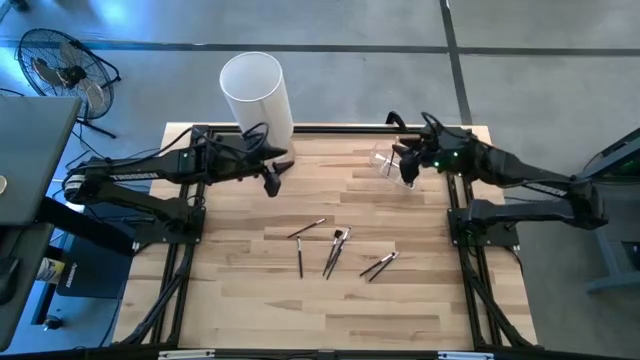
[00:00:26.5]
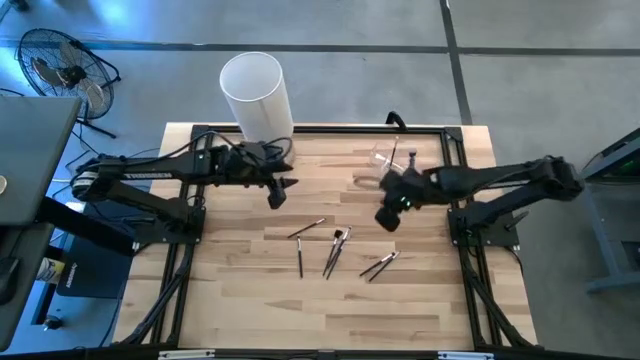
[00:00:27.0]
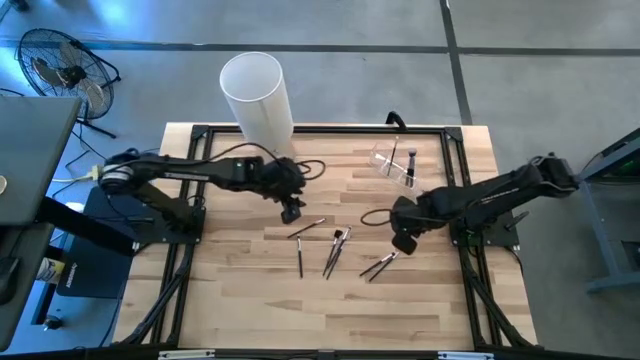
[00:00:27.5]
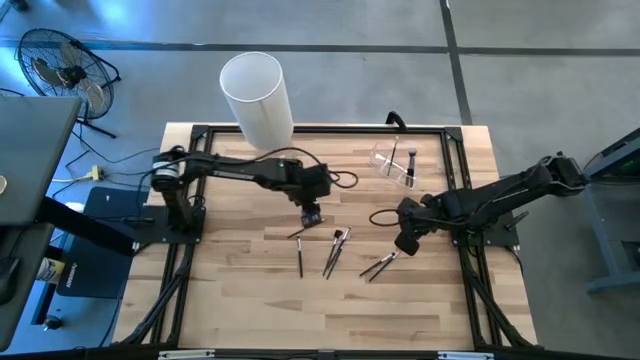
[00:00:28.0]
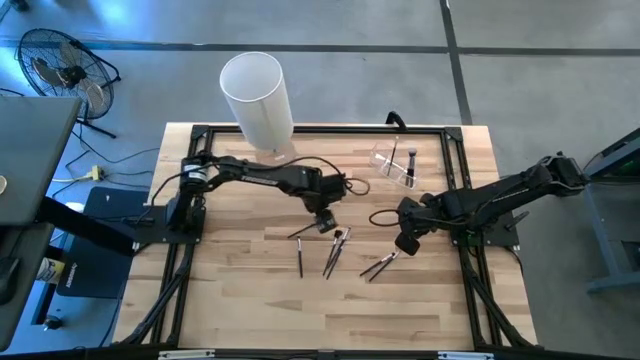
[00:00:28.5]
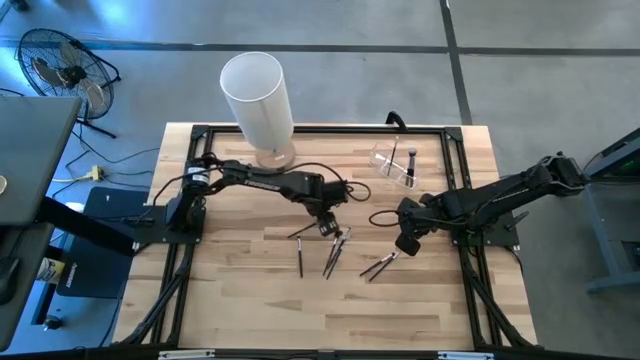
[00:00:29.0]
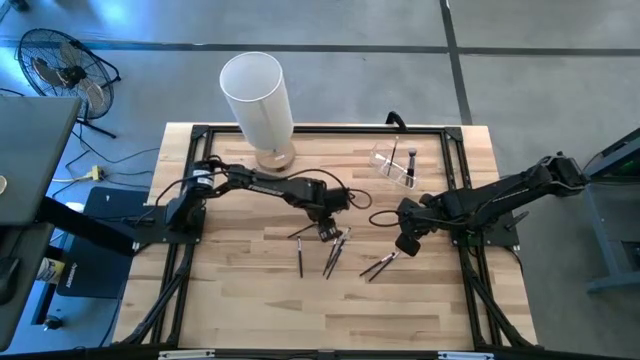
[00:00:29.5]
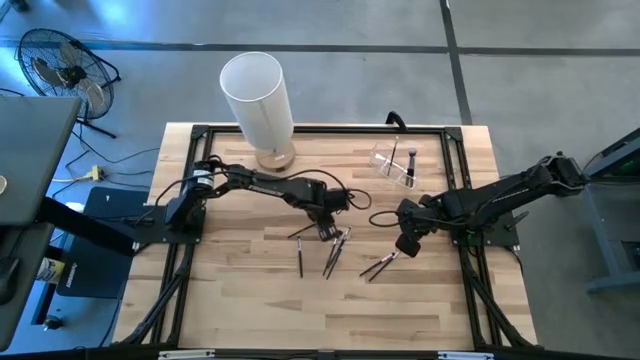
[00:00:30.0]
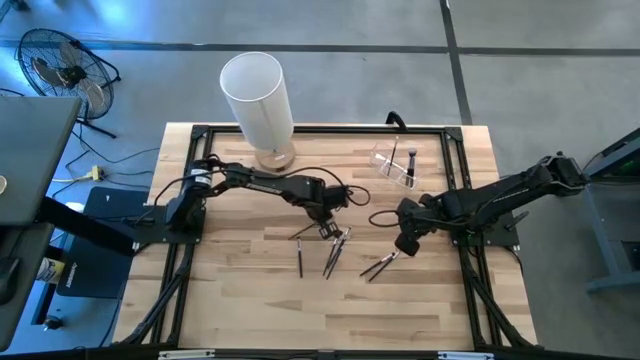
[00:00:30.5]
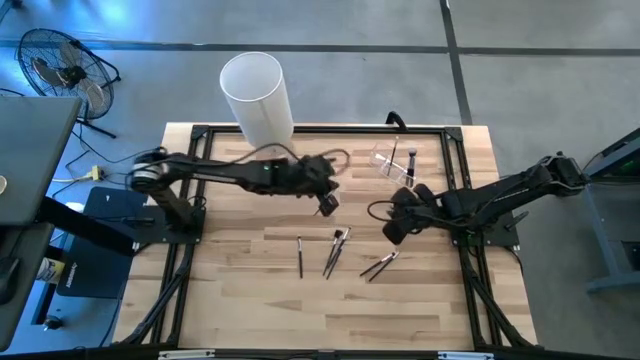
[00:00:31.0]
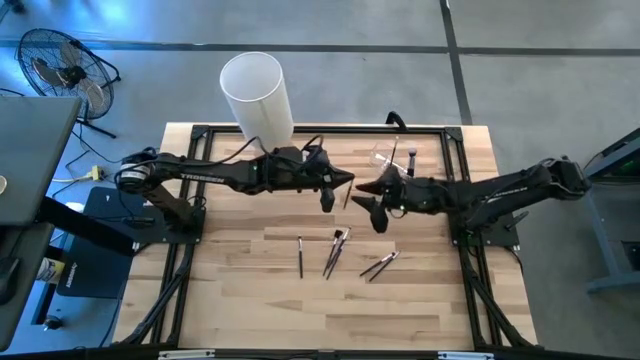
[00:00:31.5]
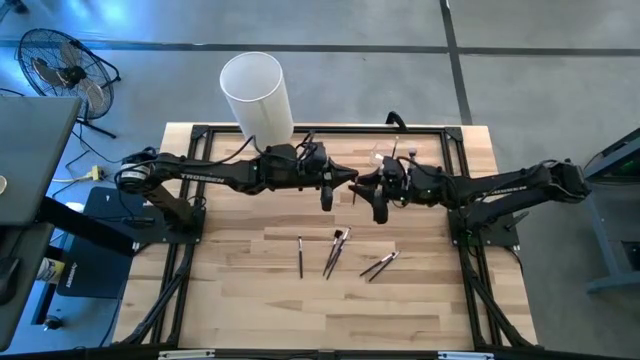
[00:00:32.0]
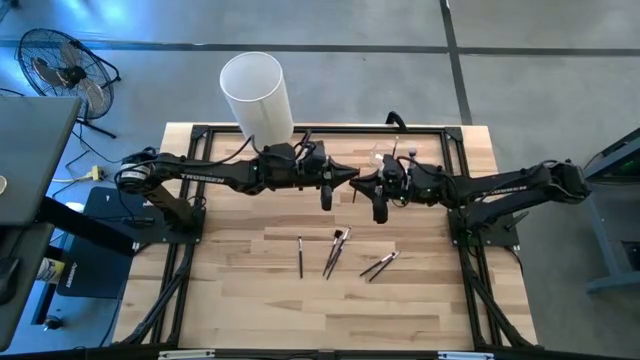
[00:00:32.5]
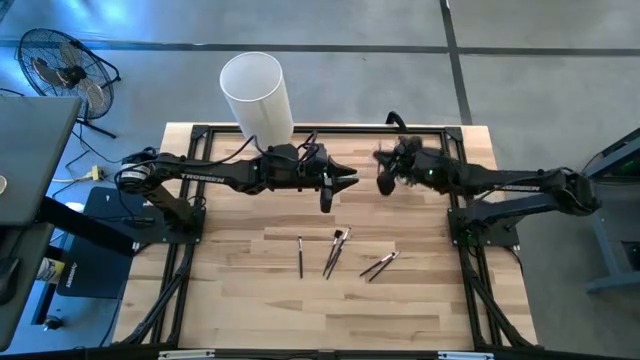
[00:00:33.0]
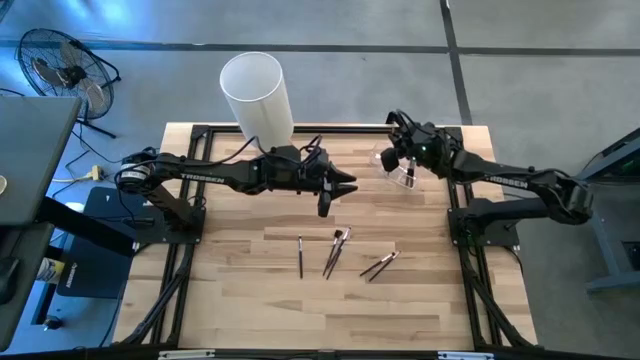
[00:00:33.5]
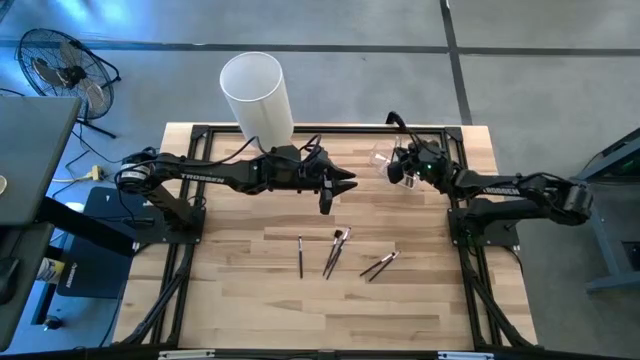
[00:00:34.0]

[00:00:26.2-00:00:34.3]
Task: Put items in baskets/containers
Put the eyeshadow brush into the transparent organizer

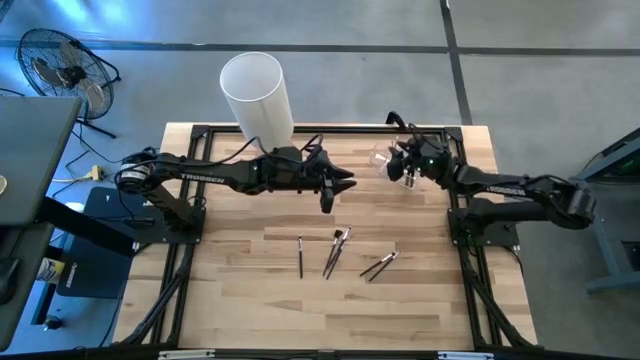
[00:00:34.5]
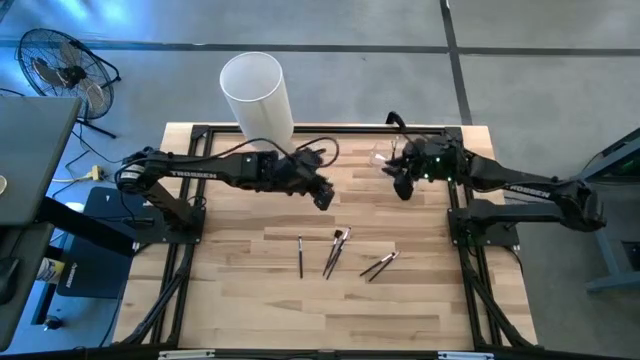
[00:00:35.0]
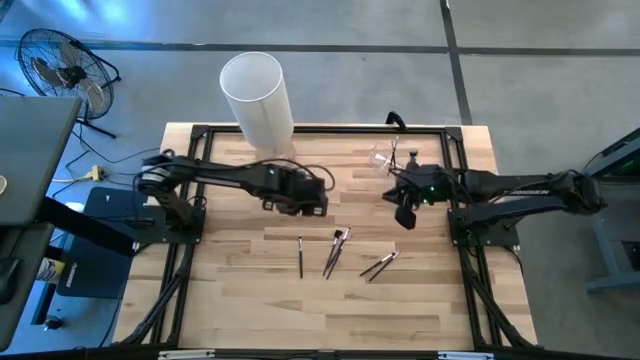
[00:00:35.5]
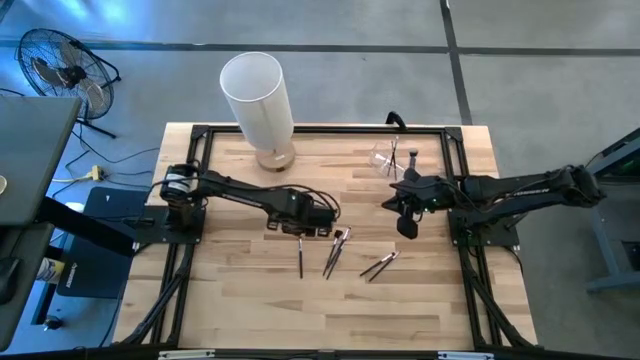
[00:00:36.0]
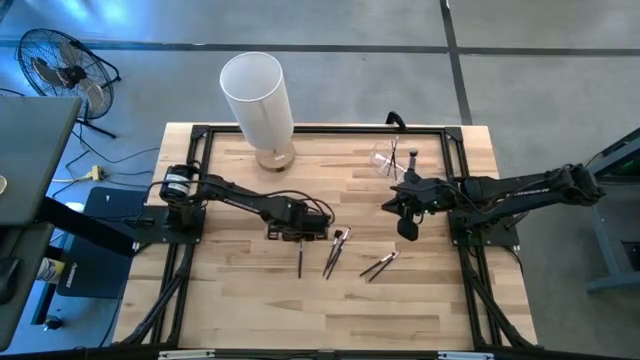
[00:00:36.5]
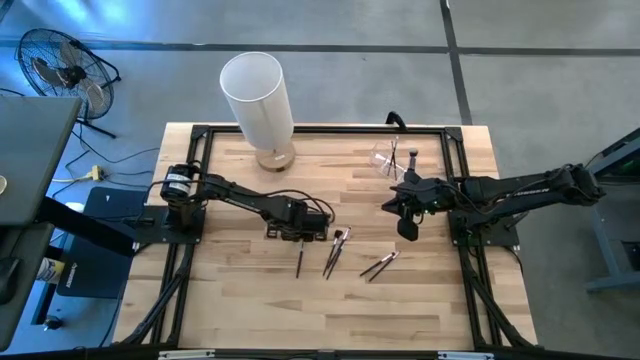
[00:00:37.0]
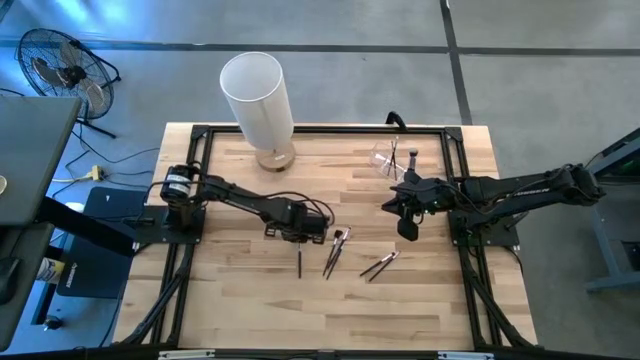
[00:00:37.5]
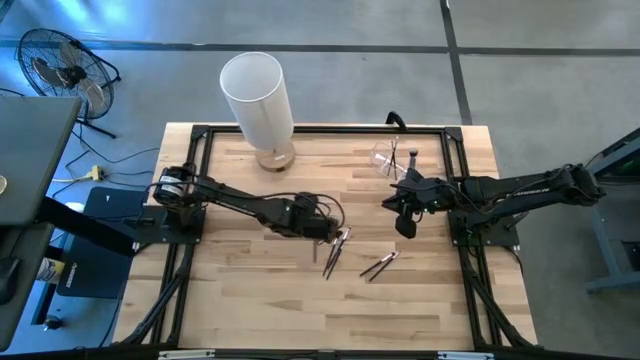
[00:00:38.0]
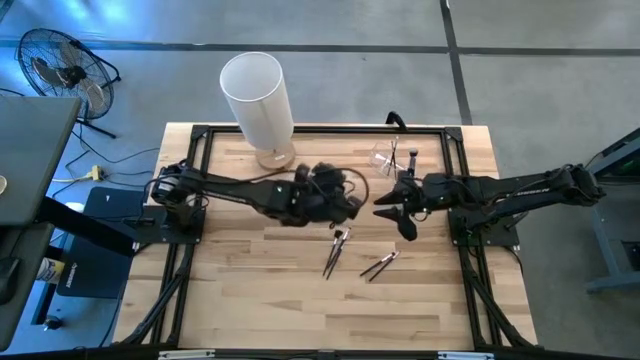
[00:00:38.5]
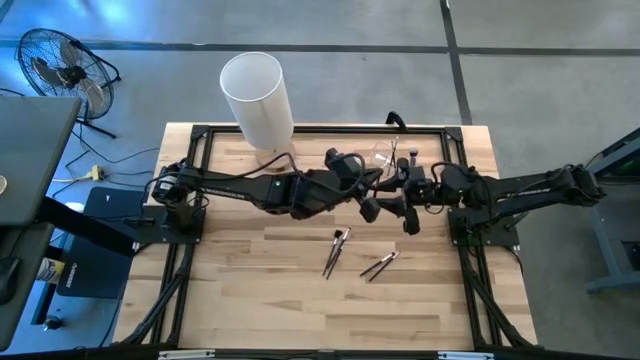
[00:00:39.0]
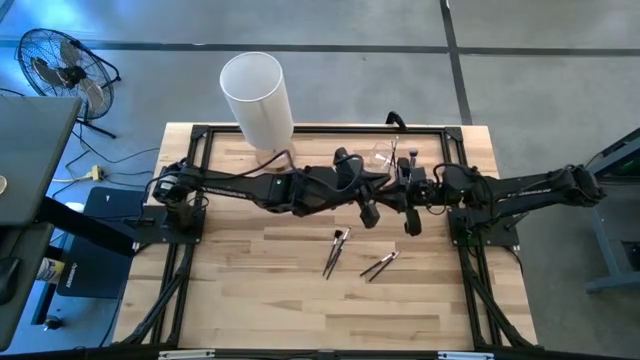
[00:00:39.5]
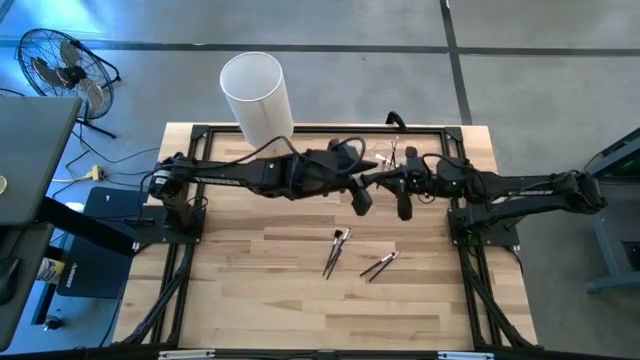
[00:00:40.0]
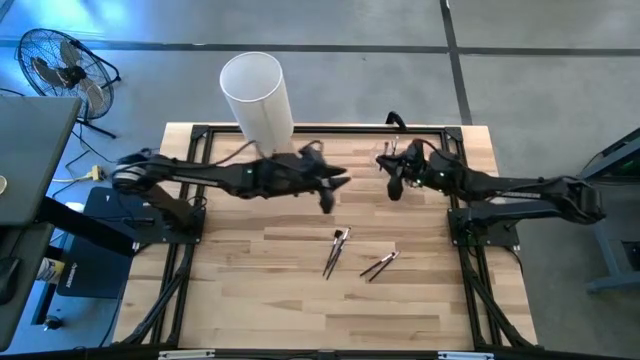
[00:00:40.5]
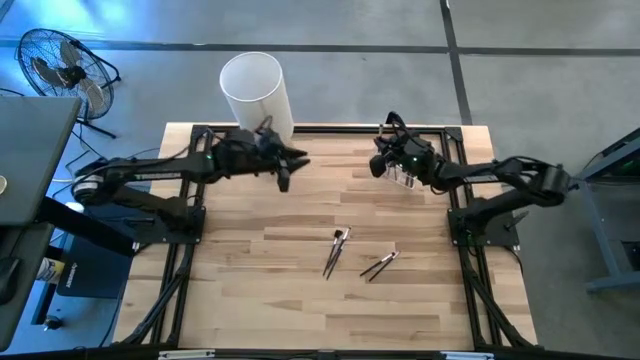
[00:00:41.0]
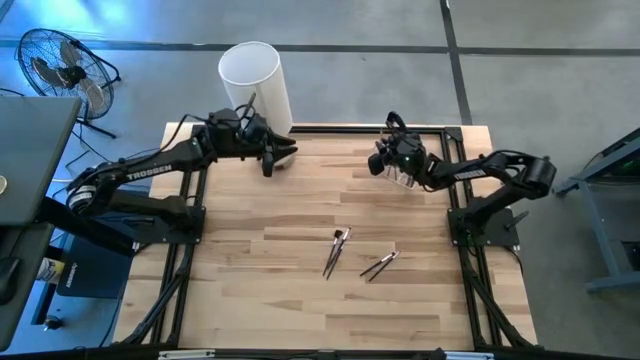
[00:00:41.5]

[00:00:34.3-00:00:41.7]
Put the eyeshadow brush into the transparent organizer

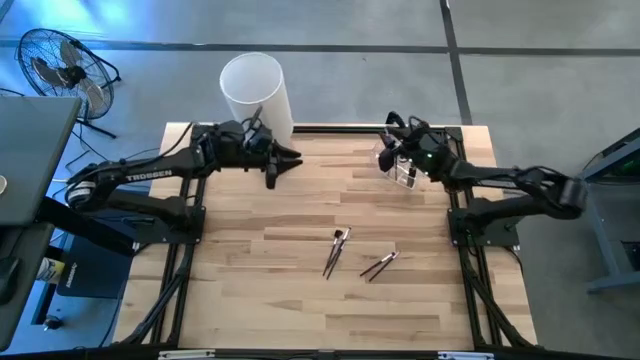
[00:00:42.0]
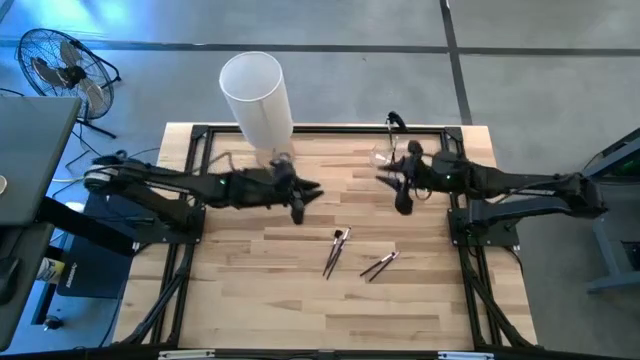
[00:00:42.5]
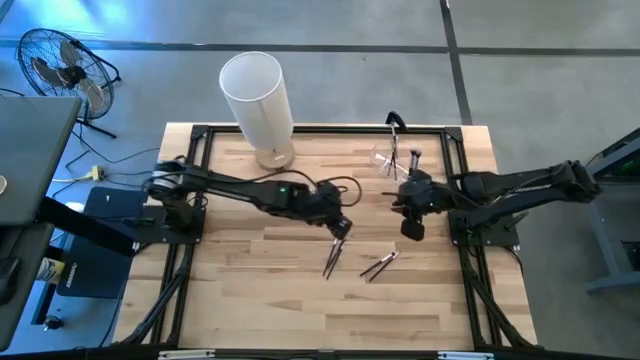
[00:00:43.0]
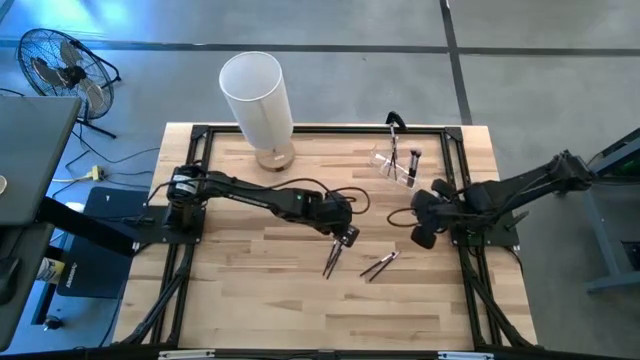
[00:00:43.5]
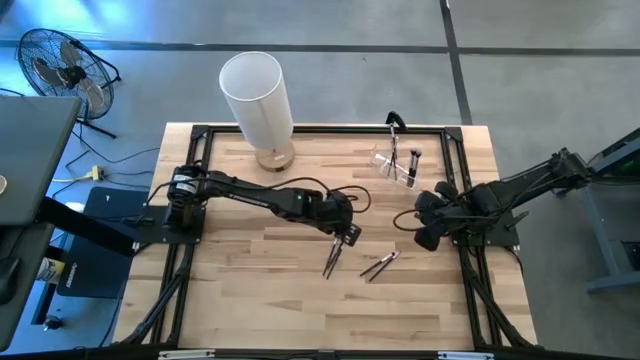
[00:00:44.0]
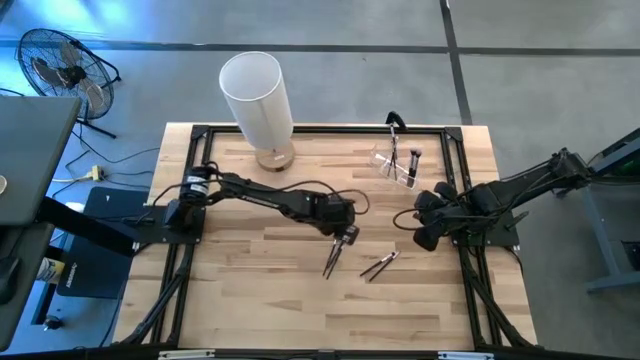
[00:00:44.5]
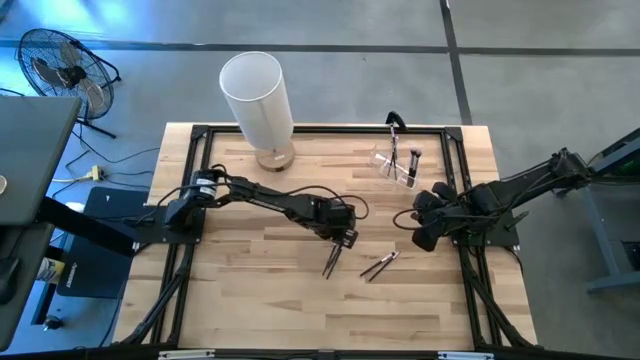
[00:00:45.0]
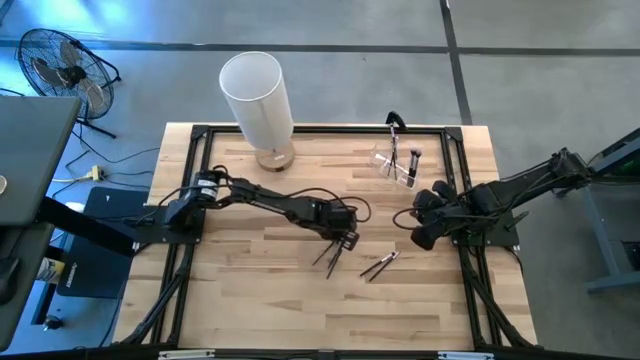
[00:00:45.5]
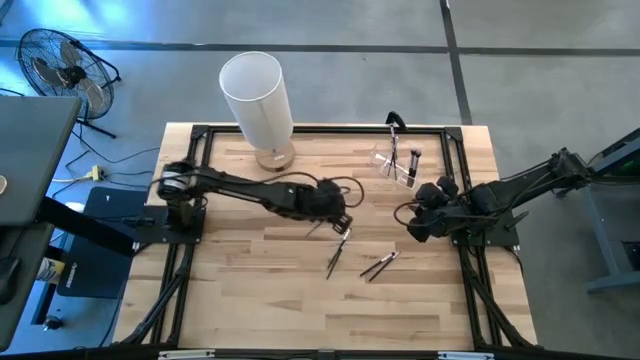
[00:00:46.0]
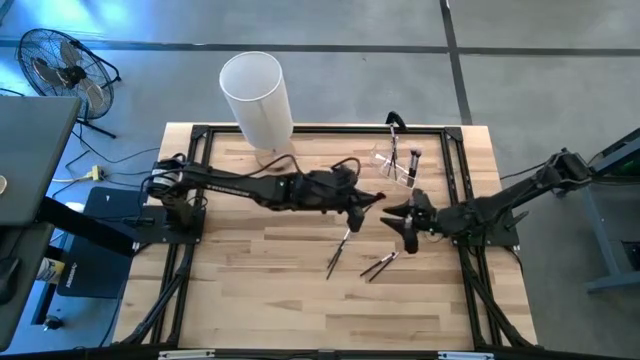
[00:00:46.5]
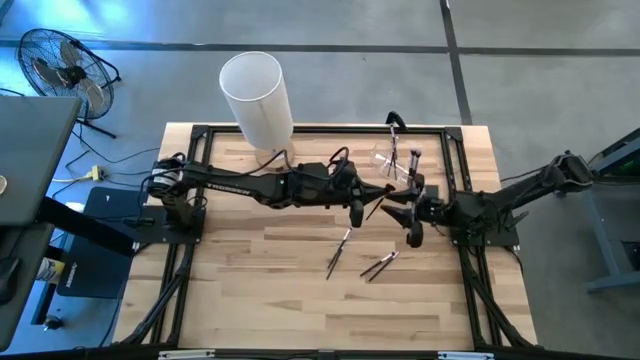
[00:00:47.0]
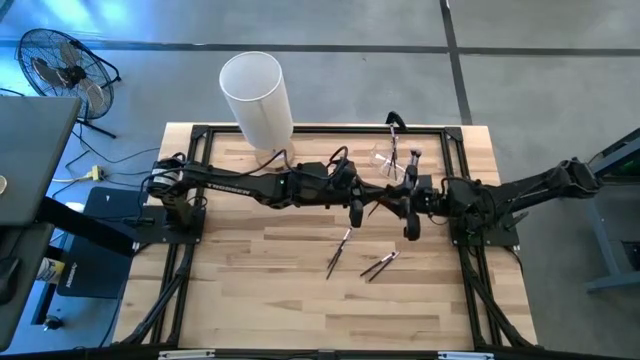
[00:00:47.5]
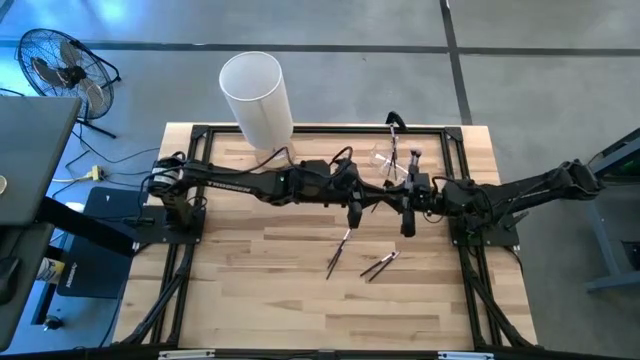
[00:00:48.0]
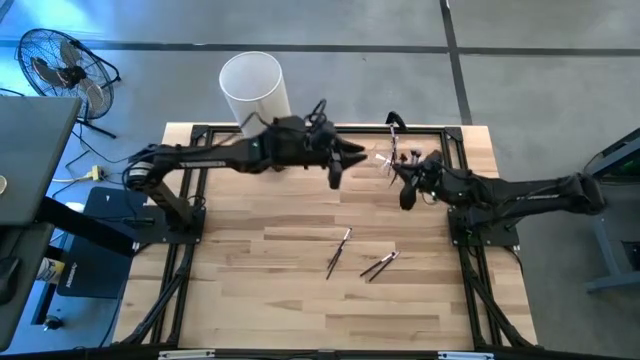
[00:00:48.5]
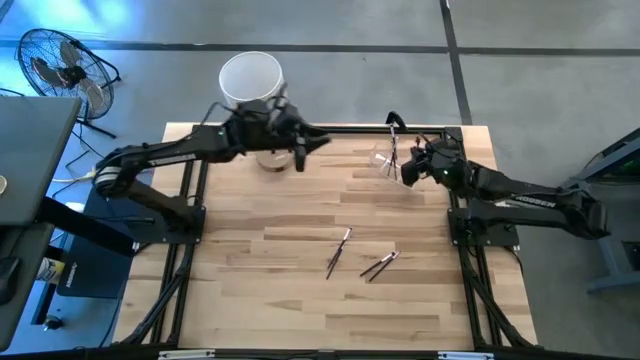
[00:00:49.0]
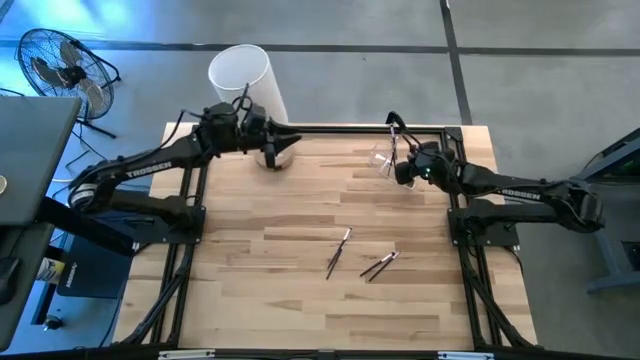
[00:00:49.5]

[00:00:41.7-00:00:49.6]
Put the brow brush into the transparent organizer
